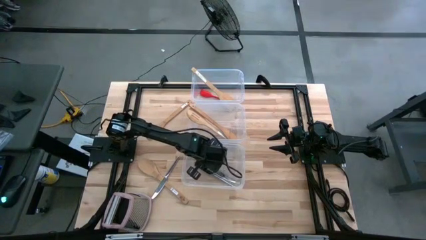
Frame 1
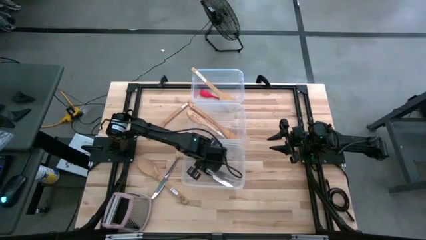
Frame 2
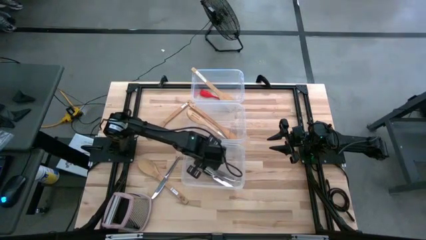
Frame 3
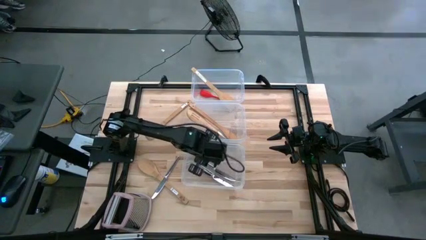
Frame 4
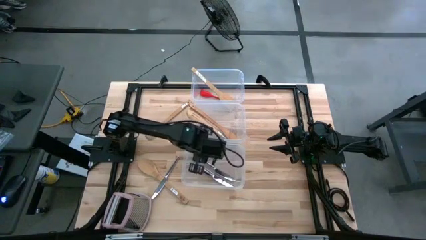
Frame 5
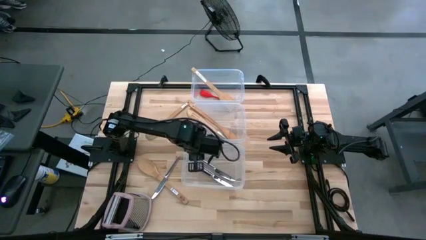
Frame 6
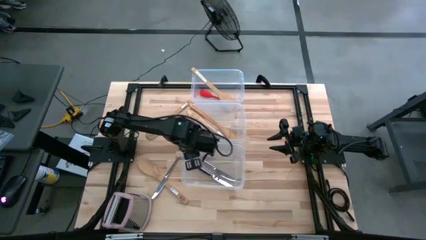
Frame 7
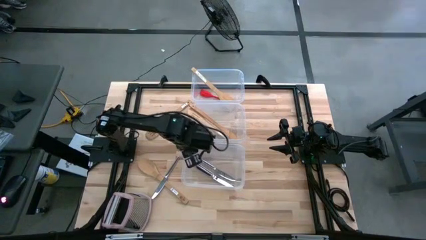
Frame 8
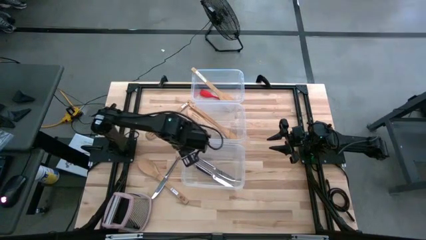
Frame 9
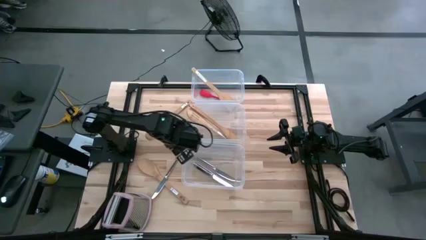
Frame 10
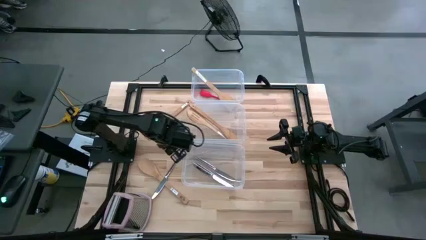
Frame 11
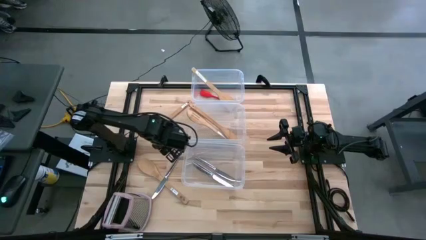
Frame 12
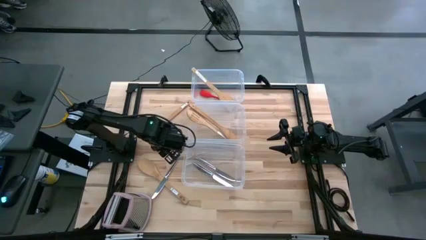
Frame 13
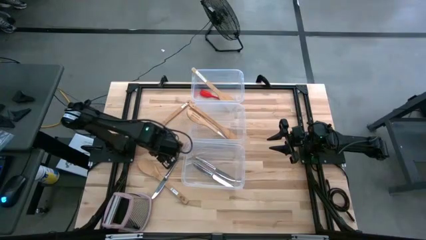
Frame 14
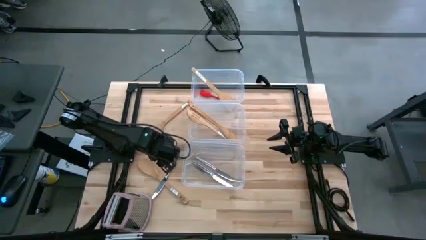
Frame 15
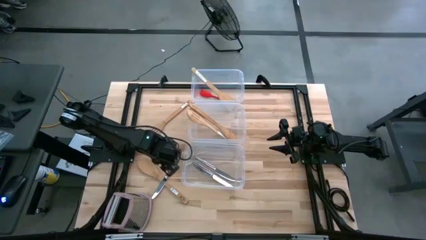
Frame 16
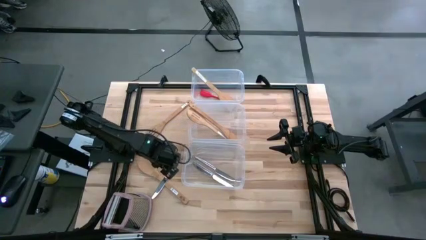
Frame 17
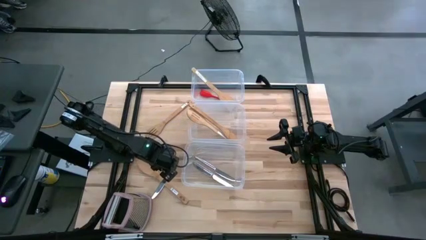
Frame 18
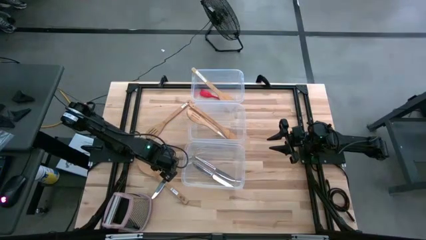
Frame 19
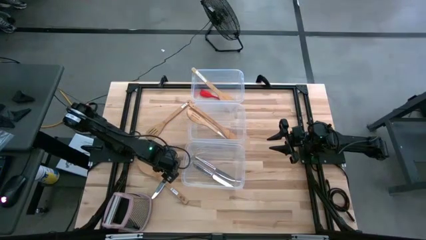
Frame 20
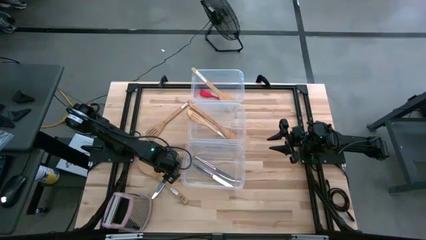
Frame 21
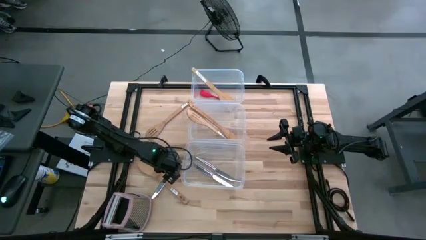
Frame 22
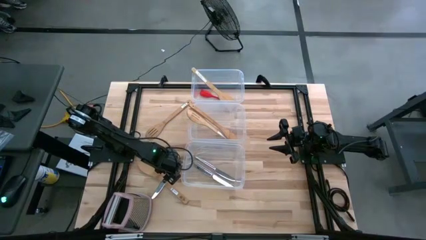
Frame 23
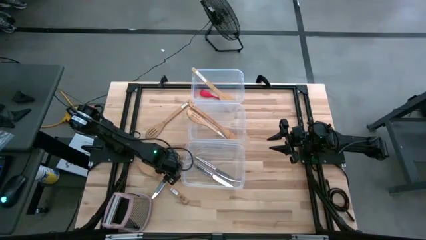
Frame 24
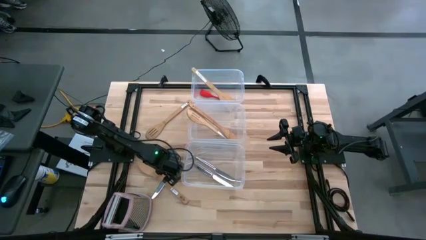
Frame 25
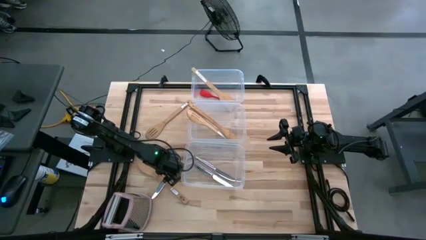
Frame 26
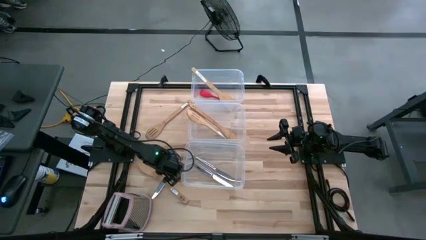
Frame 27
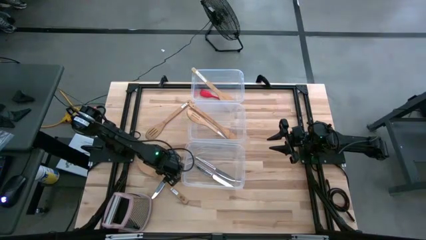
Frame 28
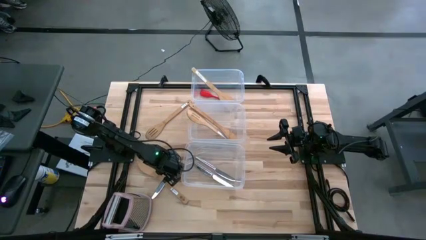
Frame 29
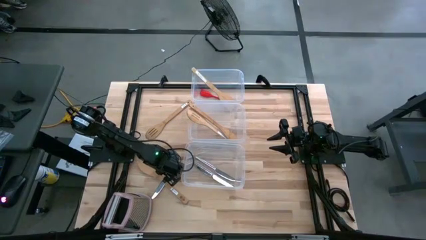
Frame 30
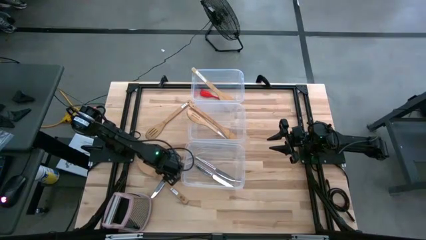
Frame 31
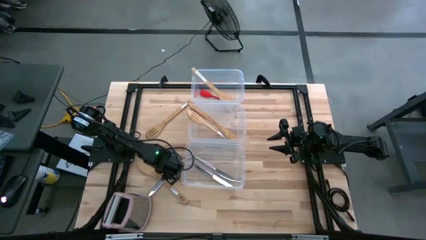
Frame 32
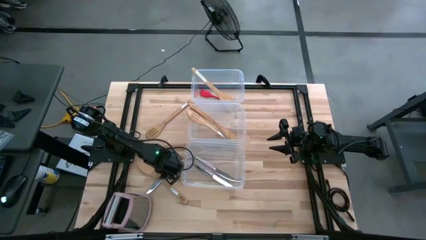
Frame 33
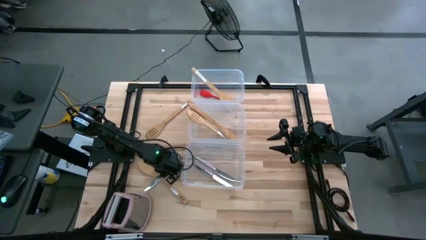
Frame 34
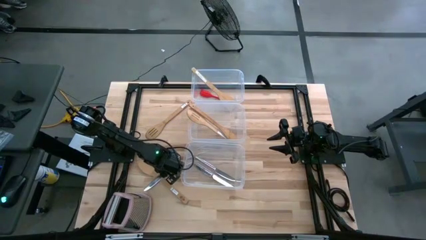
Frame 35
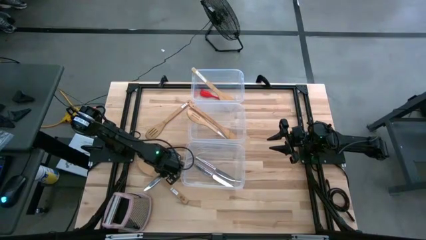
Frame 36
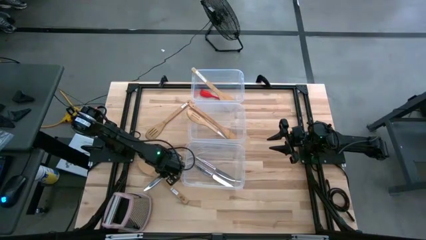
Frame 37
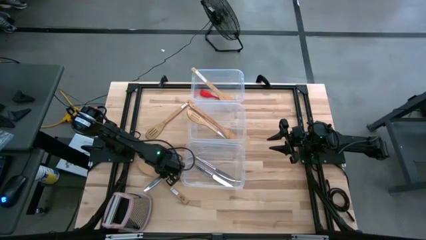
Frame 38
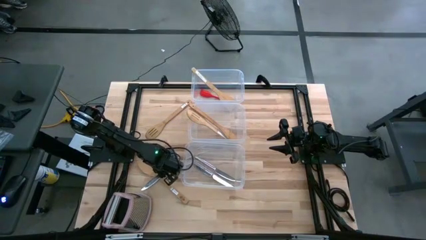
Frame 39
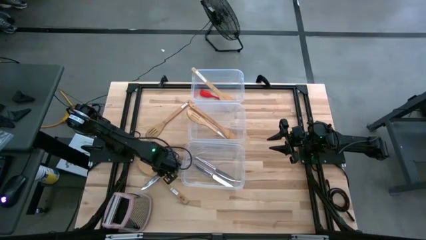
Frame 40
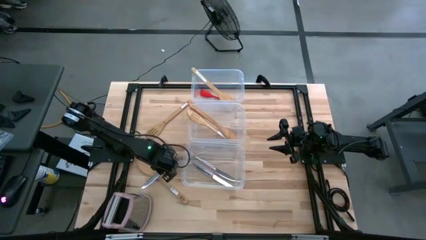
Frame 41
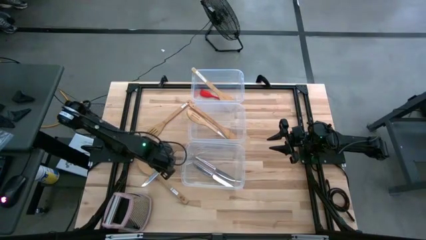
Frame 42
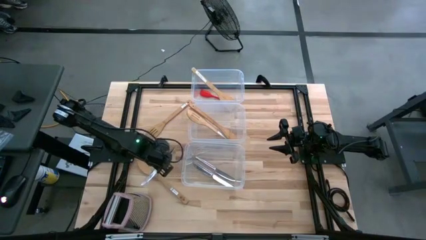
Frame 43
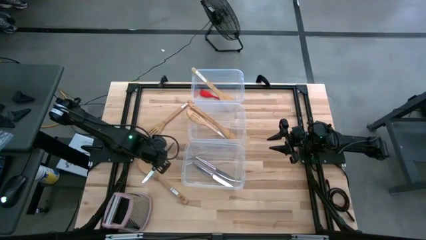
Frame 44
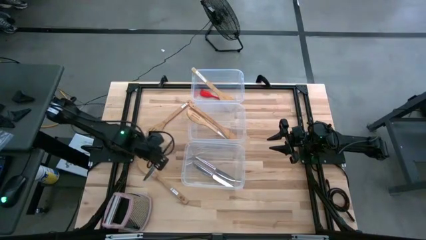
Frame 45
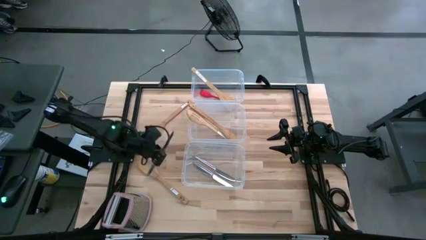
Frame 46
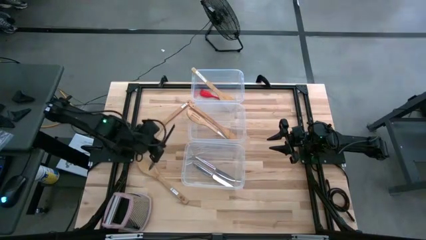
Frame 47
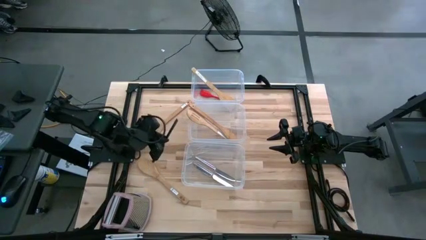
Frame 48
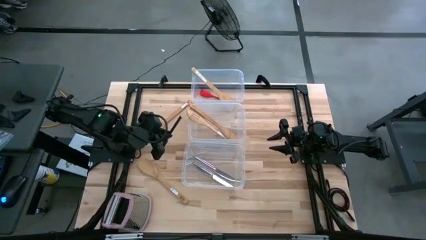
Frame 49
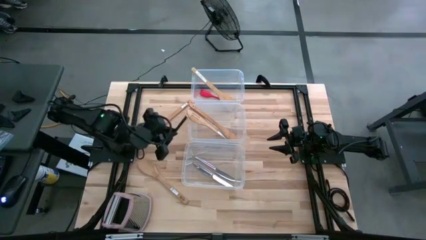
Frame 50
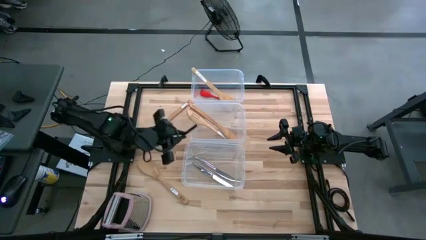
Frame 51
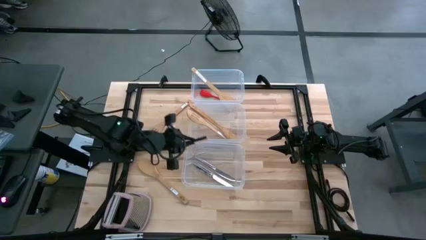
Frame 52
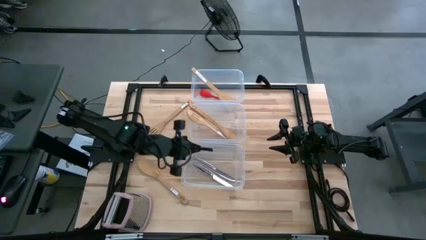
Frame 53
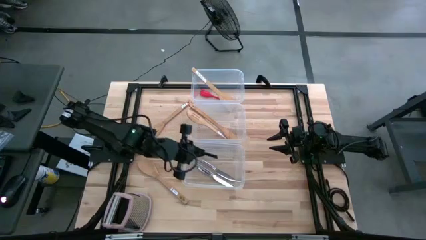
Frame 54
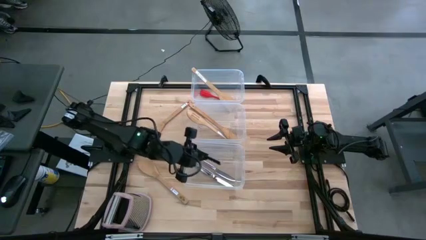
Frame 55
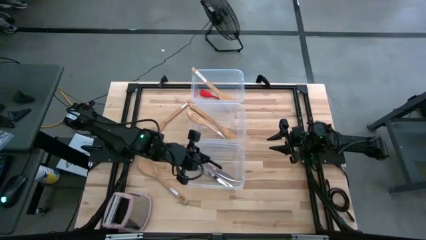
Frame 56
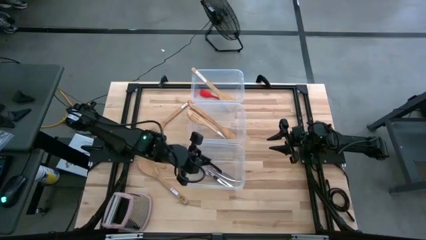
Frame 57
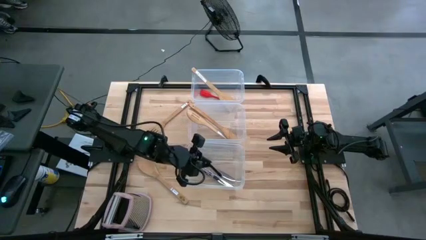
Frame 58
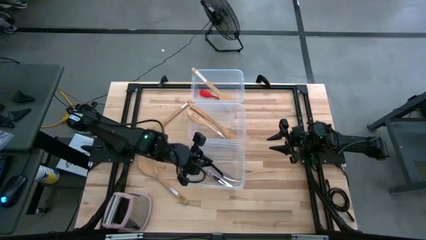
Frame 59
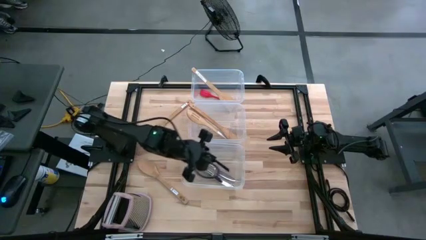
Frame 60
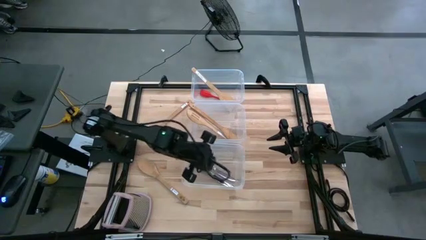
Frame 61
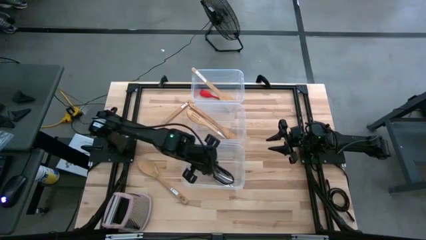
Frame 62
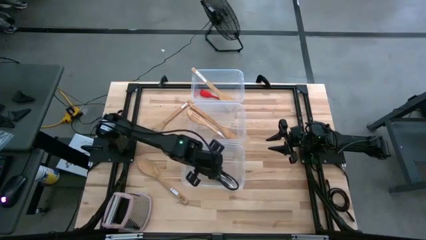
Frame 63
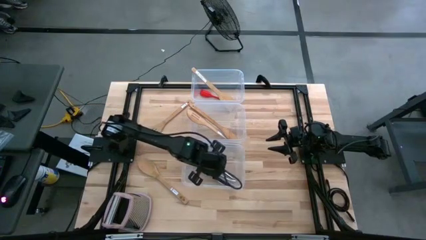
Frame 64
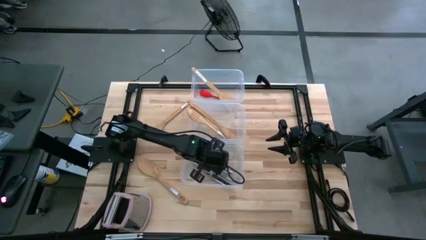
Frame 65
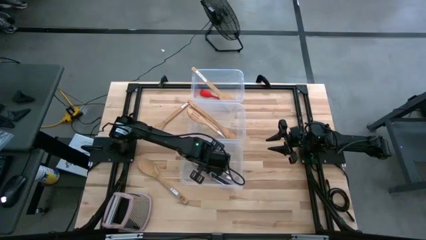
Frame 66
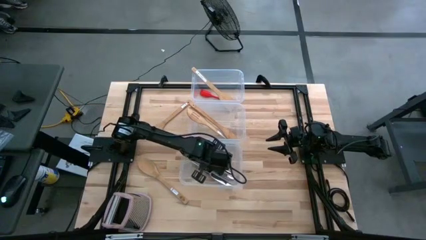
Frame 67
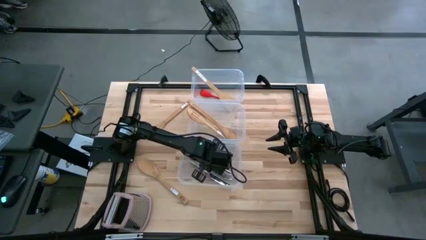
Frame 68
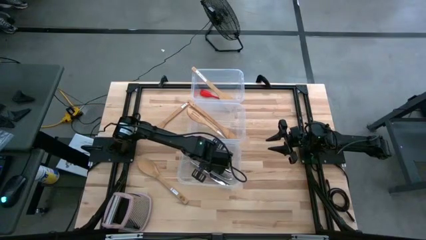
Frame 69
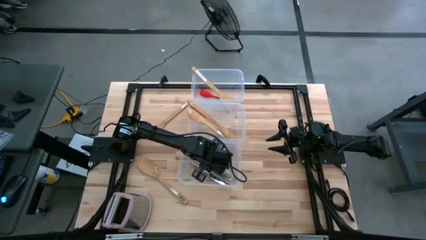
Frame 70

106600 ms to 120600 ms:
Task: Pick & Place Kitchen Items
Put the silver knife into the bottom transparent bin

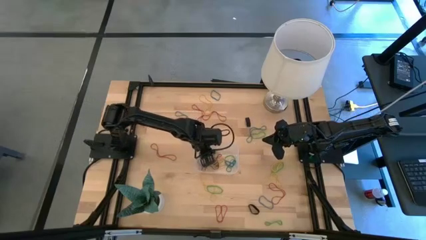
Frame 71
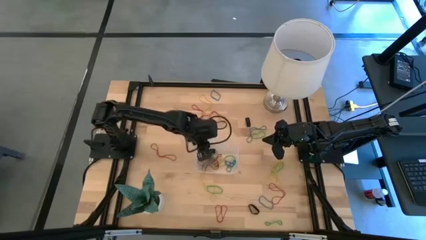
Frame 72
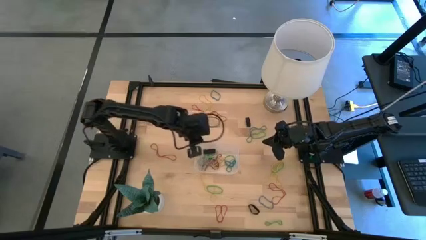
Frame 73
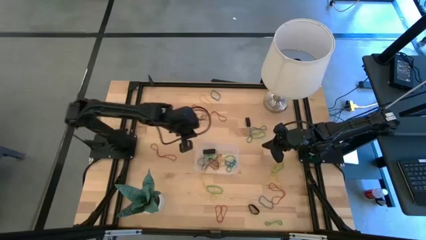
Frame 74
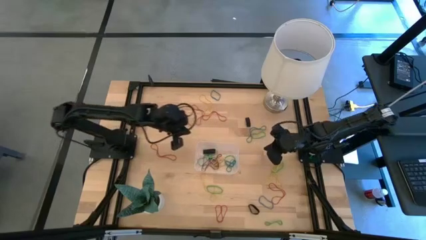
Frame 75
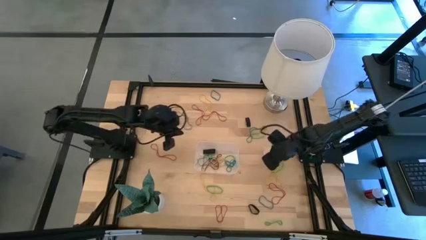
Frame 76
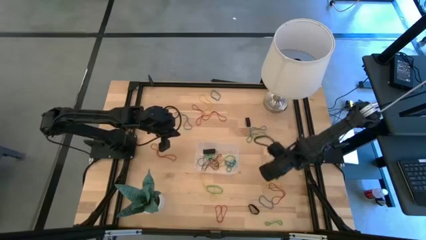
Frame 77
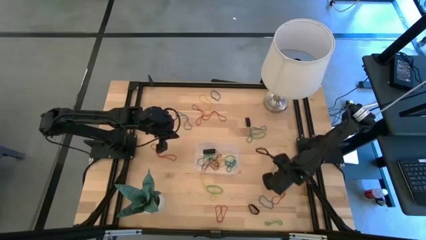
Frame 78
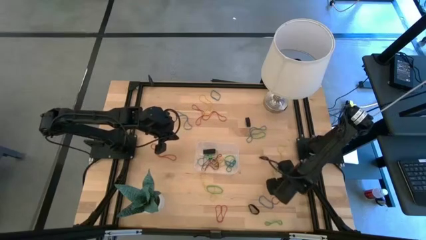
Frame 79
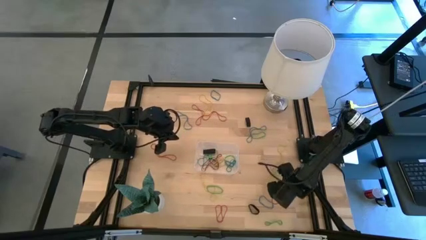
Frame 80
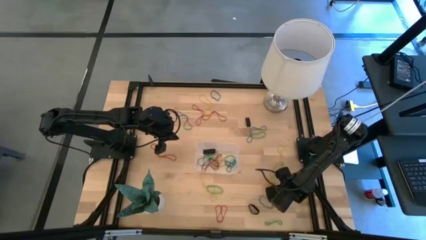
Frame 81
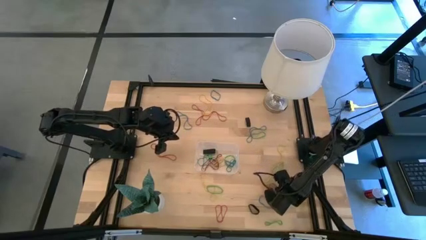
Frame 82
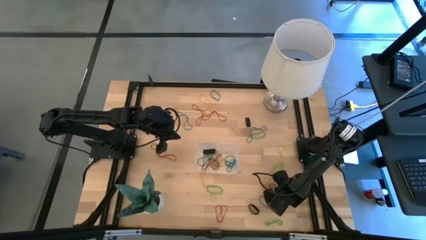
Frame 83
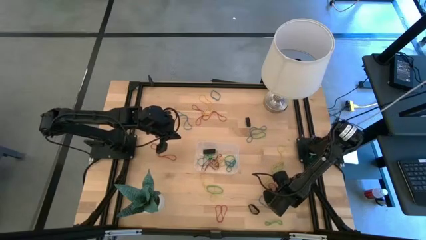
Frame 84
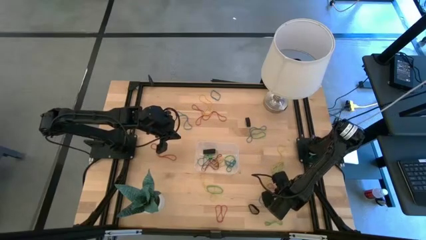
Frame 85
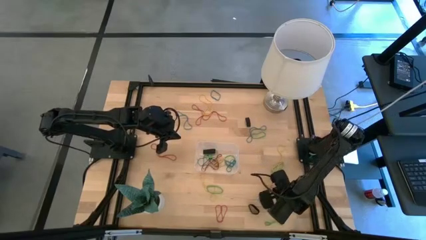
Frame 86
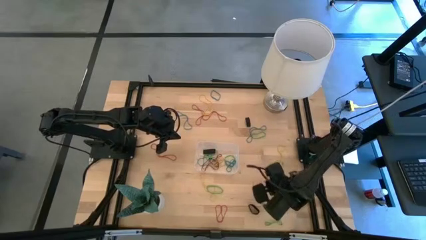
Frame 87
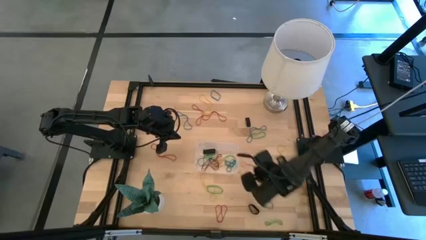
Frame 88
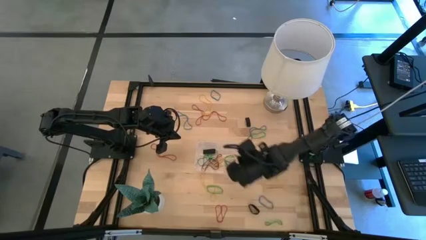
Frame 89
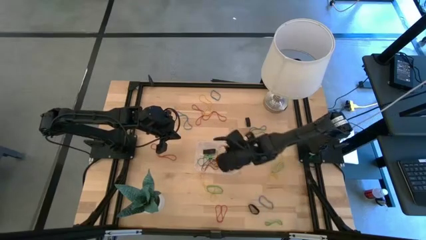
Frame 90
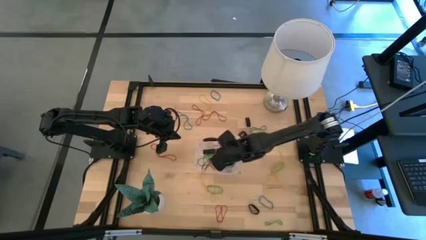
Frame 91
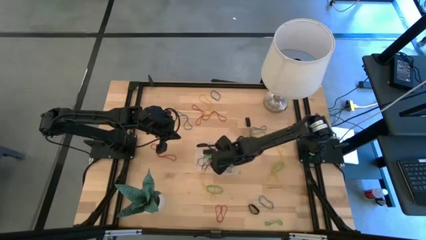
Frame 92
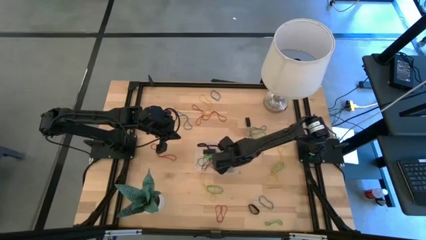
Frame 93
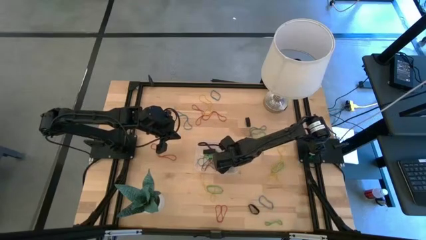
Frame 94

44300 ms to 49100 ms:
Task: Pick and place rubber bands into bin
Put the red rubber band into the transparent bin
